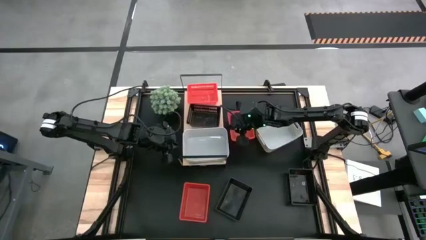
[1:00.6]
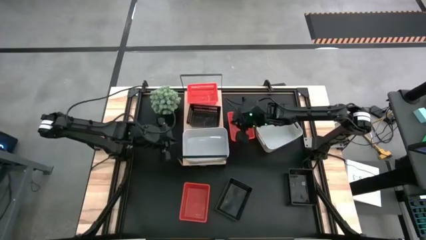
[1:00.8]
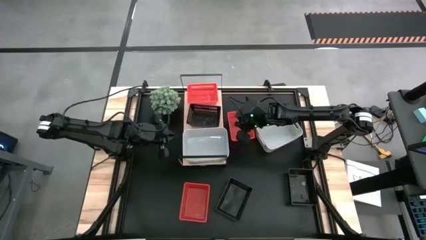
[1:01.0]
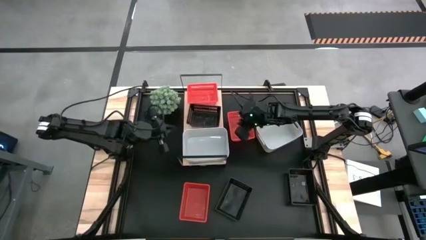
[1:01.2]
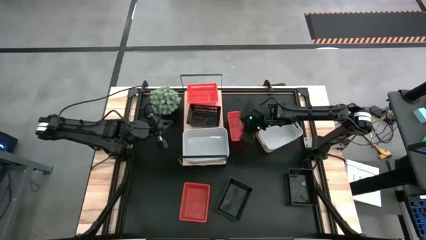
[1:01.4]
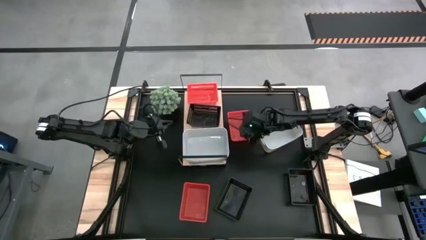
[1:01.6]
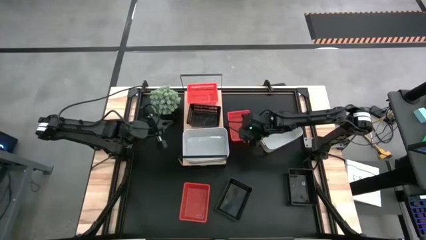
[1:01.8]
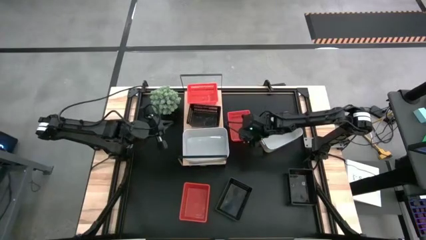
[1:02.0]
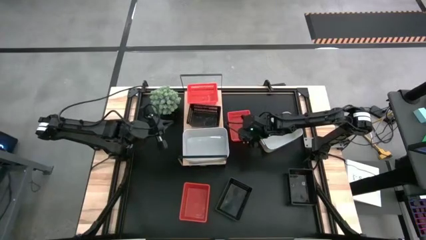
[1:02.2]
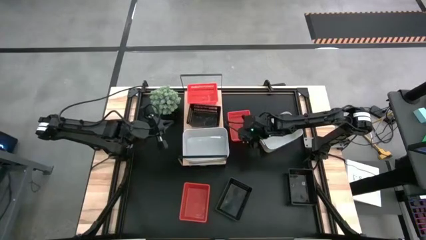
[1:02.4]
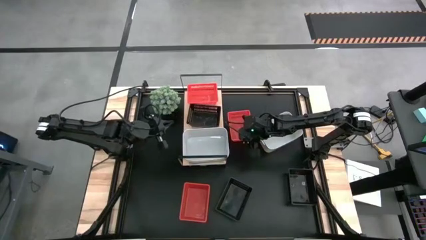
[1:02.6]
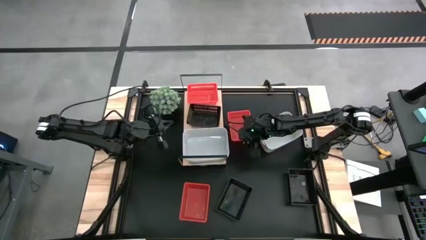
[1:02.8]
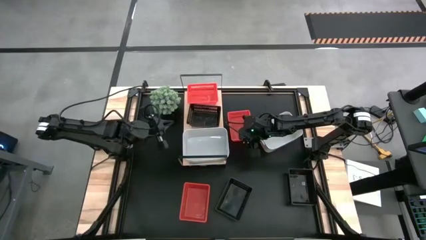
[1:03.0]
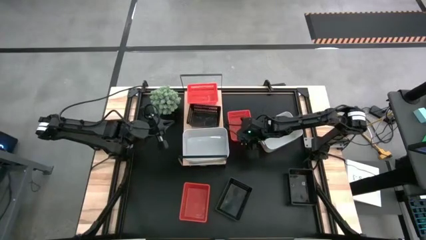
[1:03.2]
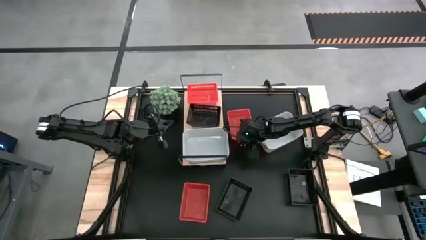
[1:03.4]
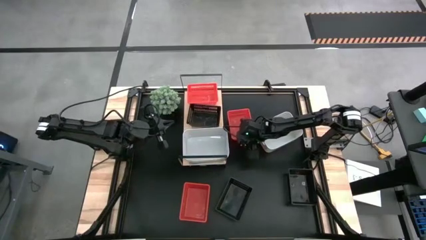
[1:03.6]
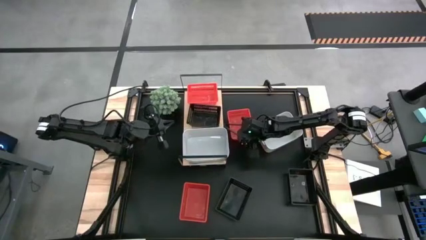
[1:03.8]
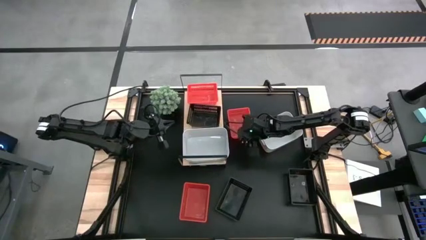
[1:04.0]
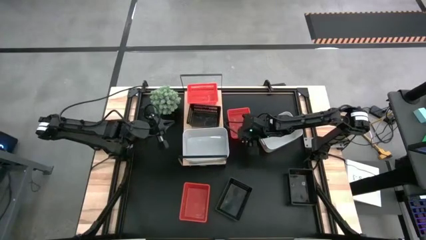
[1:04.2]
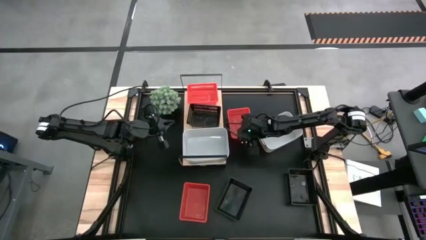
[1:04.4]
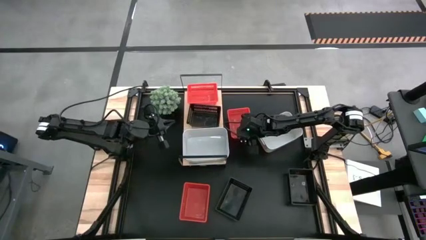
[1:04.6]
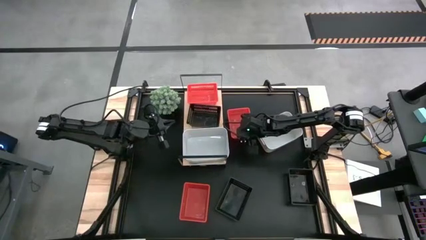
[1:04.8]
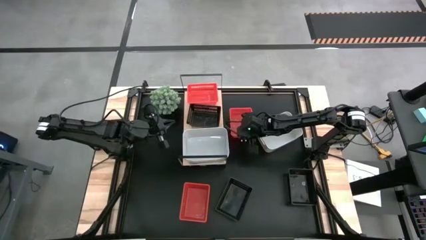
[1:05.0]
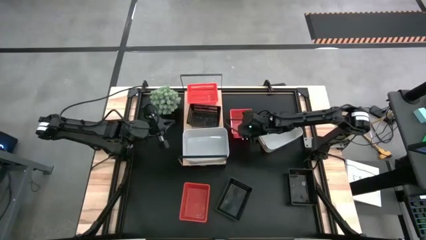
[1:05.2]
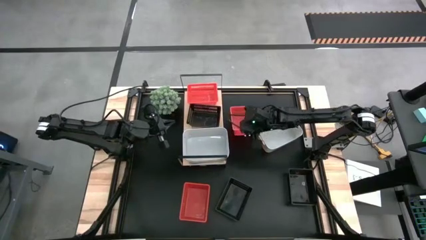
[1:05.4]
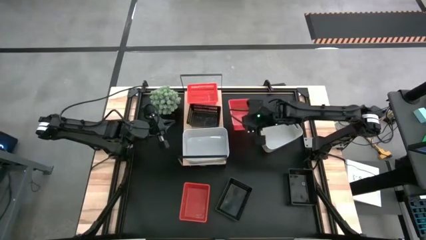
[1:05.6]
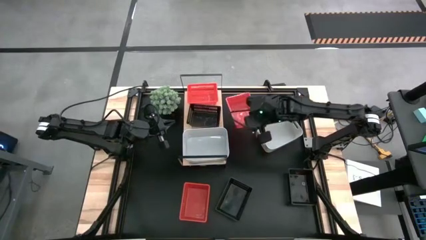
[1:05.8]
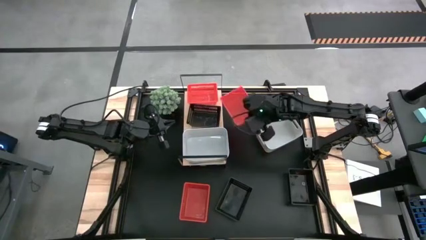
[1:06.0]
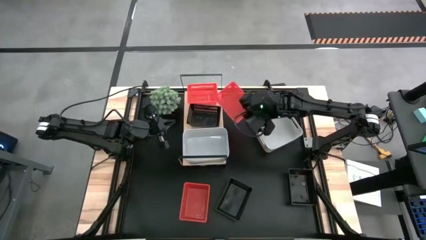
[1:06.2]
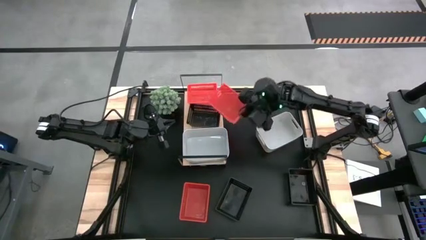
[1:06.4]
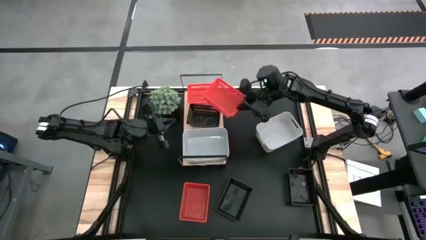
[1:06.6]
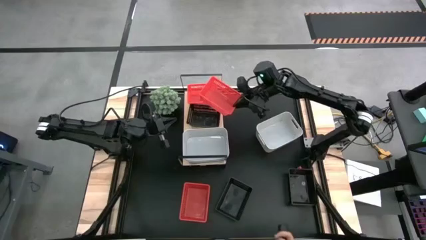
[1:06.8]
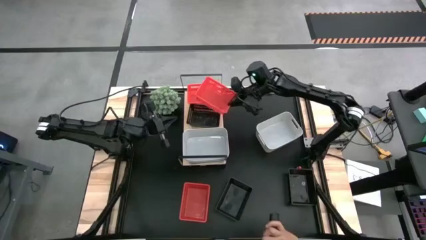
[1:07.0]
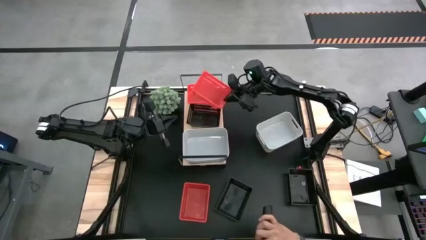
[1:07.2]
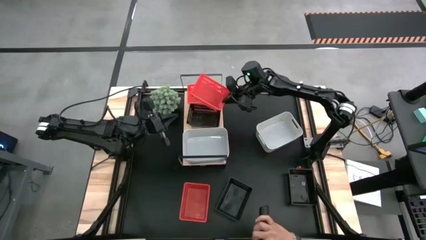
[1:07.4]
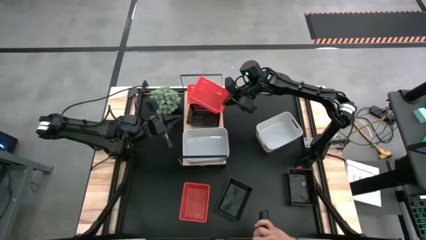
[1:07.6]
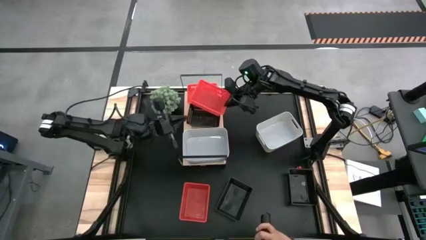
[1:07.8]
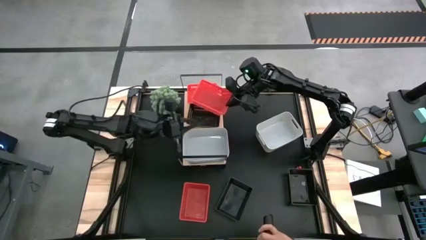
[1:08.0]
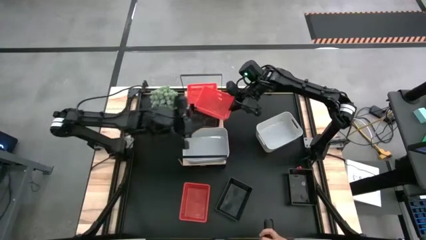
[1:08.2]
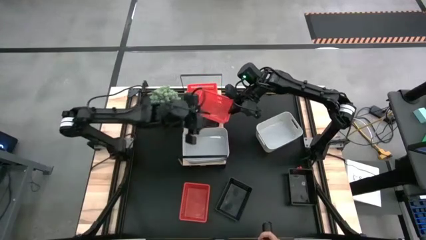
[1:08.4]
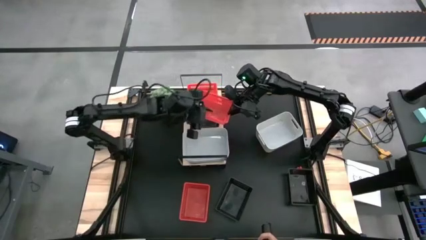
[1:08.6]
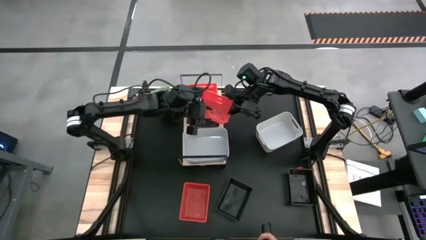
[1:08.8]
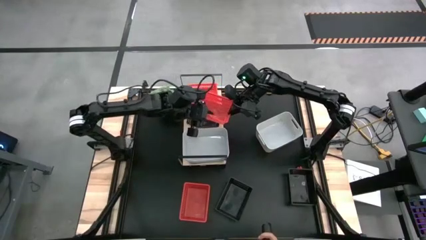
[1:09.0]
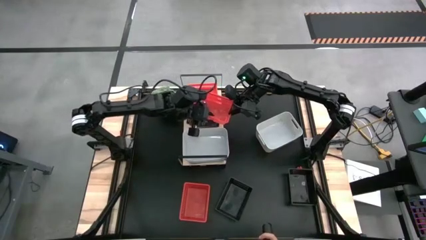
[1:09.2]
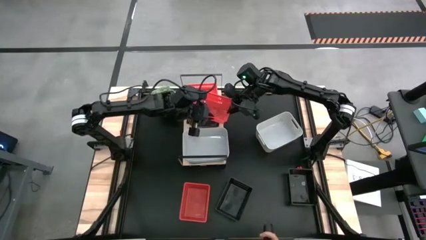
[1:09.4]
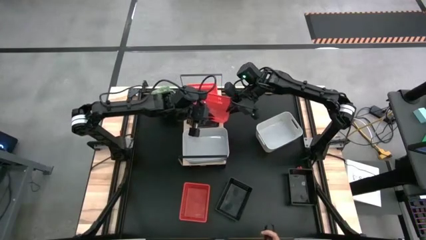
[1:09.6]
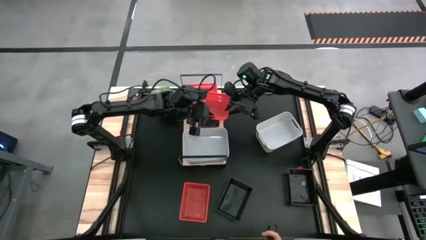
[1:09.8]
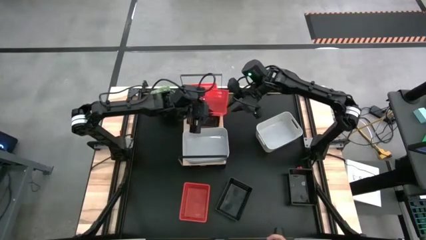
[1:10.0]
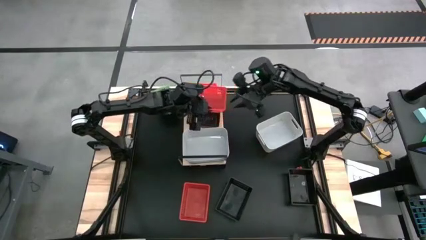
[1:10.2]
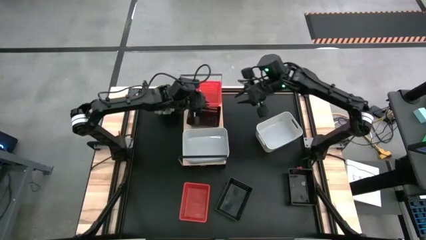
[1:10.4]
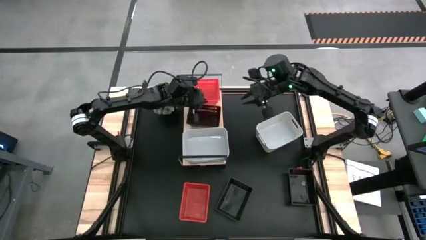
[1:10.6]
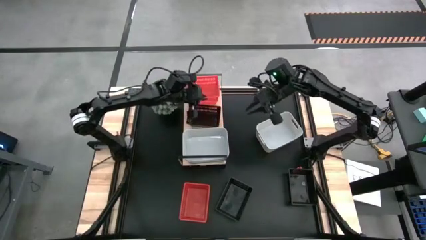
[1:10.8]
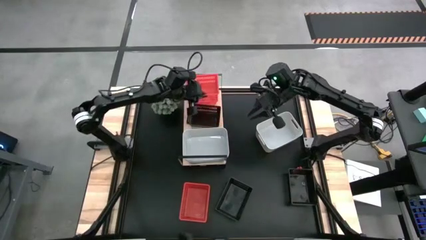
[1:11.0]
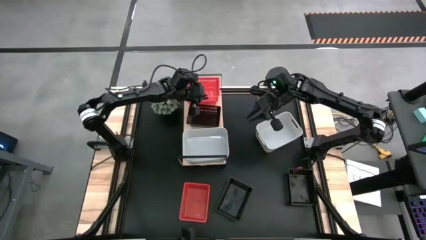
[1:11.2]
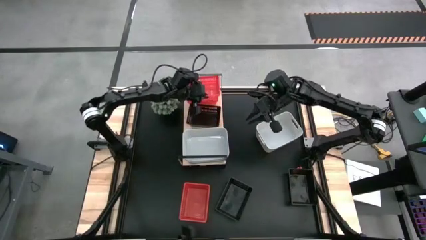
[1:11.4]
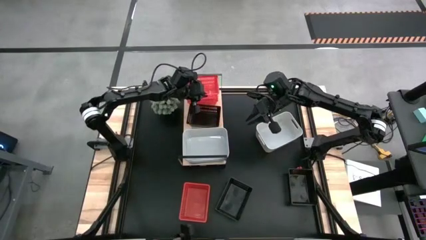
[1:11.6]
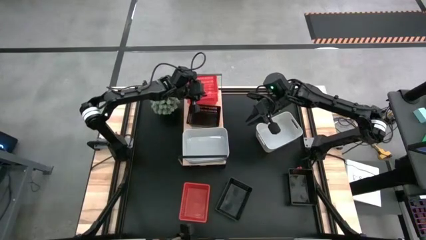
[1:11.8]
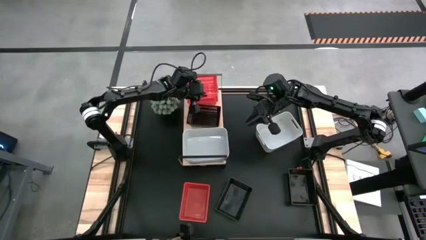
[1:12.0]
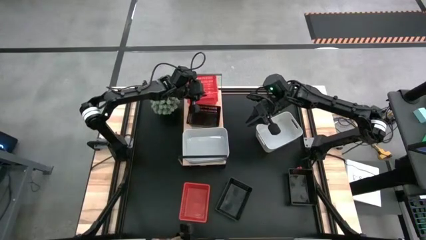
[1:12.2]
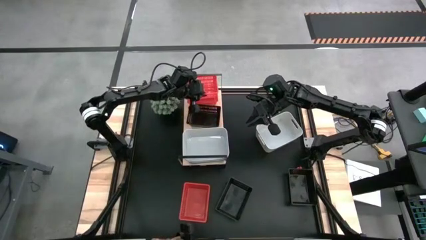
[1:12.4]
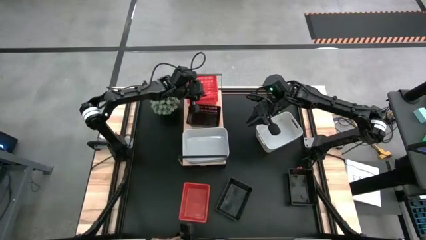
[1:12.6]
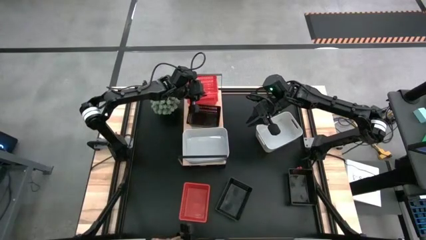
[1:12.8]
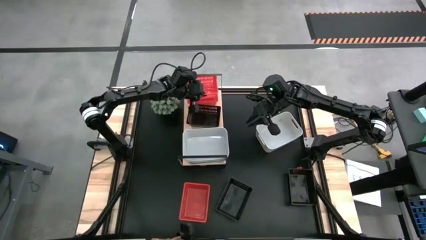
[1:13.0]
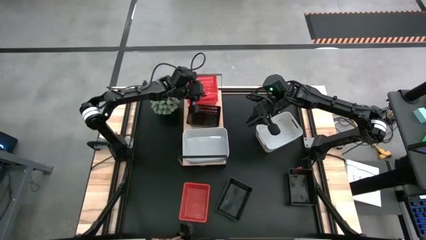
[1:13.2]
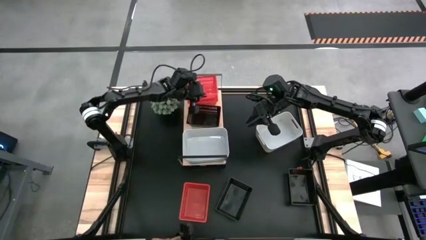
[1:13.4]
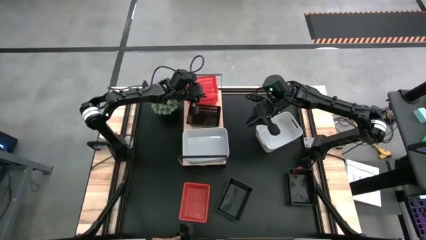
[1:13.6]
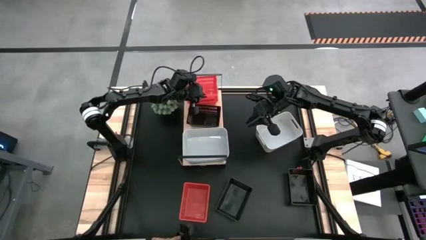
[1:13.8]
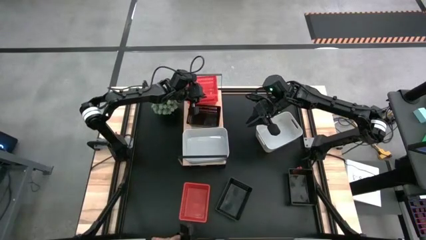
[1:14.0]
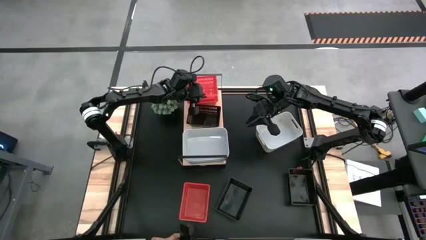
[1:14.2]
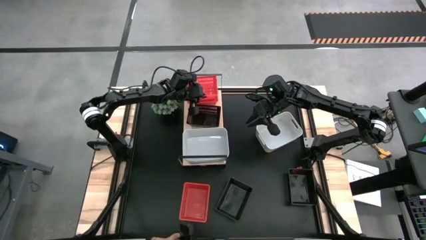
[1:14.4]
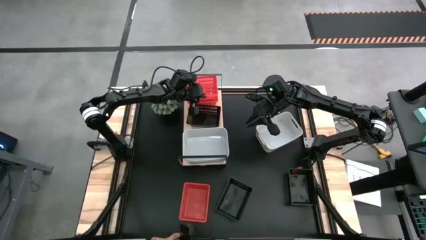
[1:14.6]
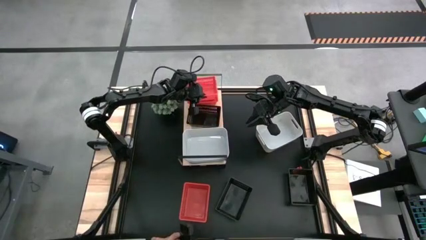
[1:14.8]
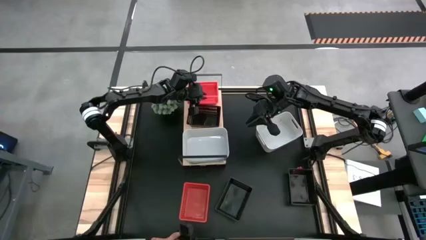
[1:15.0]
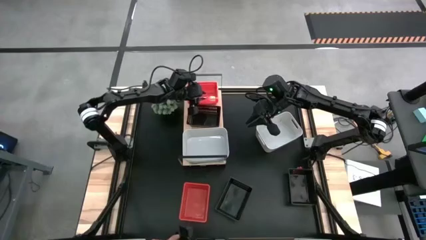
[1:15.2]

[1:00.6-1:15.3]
Task: Stack baskets on shelf by color
Stack the top red bin on top of the red bin on the shelf
